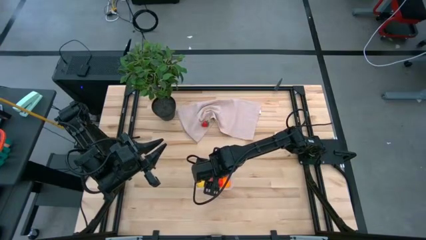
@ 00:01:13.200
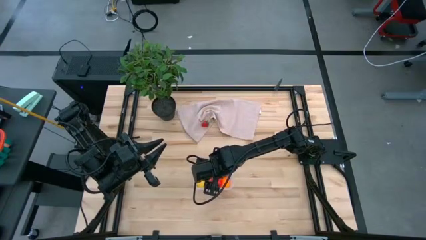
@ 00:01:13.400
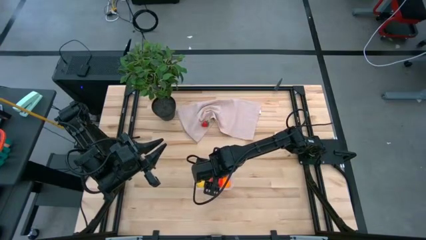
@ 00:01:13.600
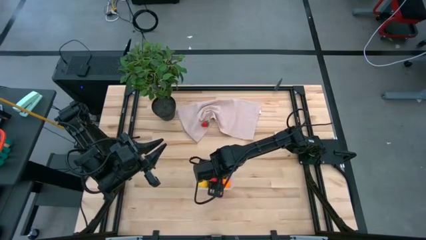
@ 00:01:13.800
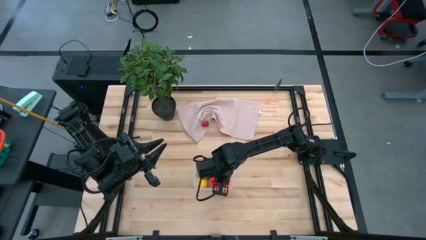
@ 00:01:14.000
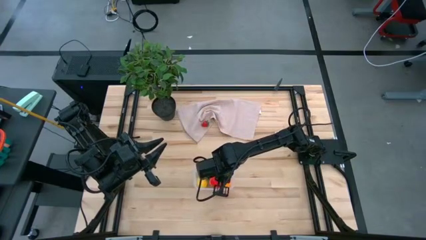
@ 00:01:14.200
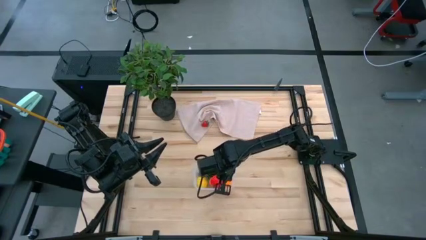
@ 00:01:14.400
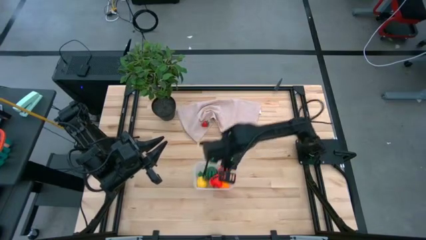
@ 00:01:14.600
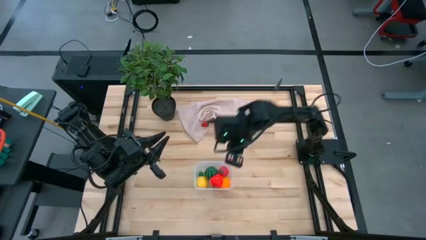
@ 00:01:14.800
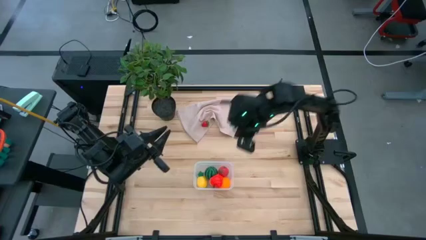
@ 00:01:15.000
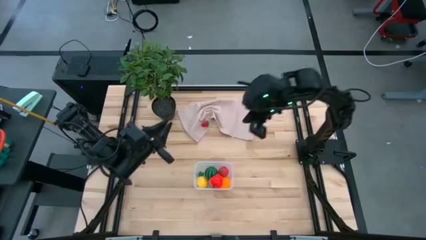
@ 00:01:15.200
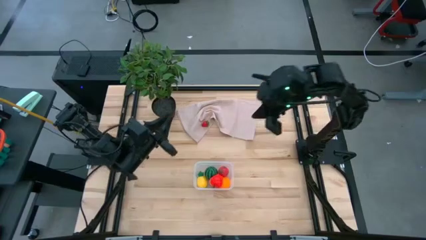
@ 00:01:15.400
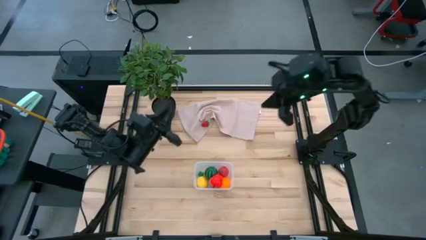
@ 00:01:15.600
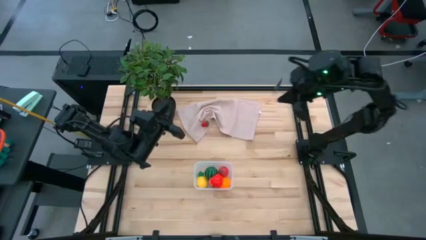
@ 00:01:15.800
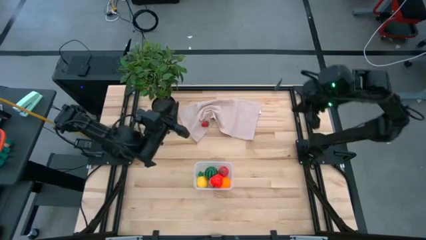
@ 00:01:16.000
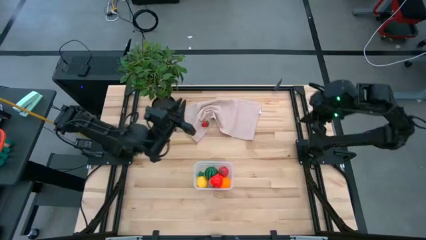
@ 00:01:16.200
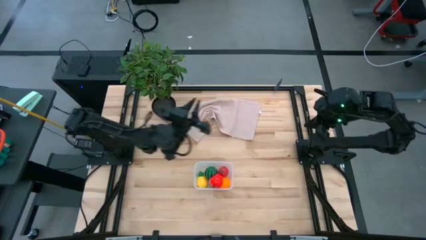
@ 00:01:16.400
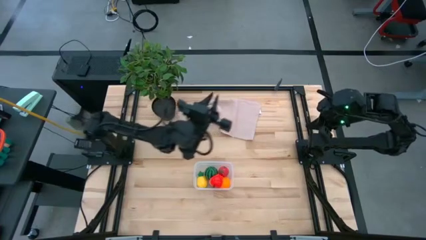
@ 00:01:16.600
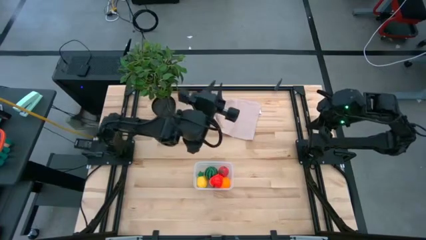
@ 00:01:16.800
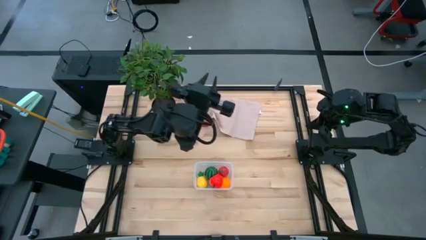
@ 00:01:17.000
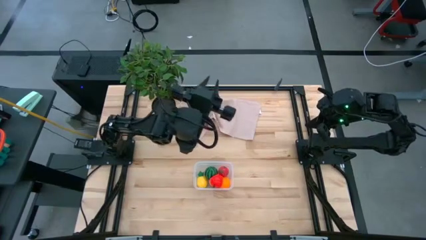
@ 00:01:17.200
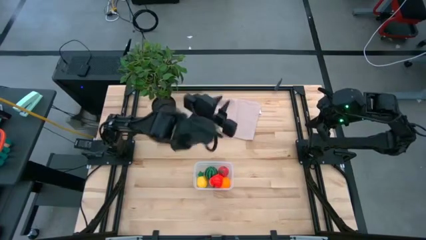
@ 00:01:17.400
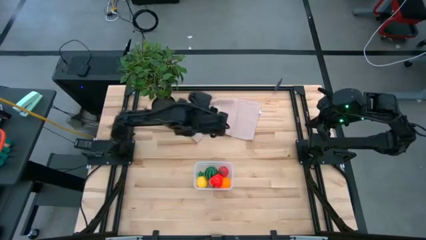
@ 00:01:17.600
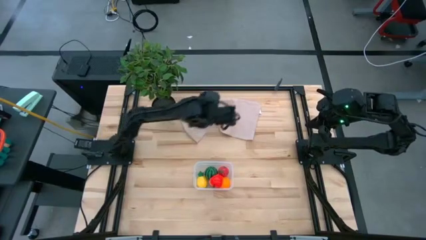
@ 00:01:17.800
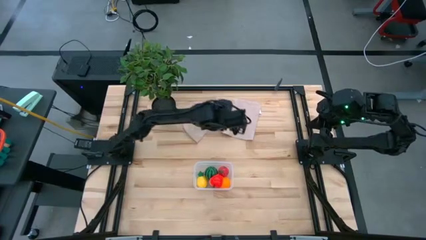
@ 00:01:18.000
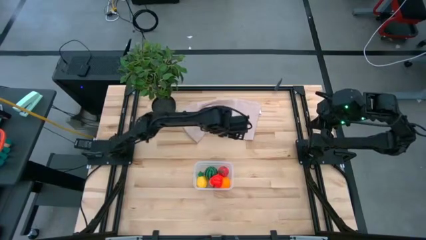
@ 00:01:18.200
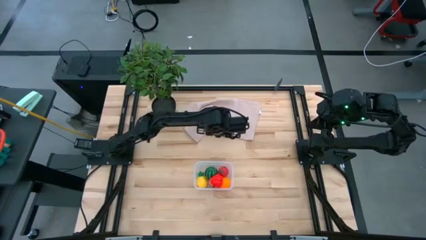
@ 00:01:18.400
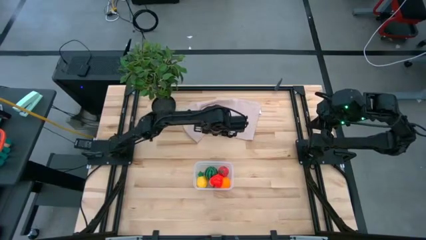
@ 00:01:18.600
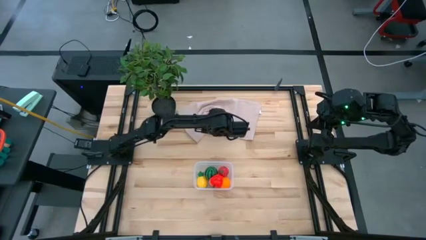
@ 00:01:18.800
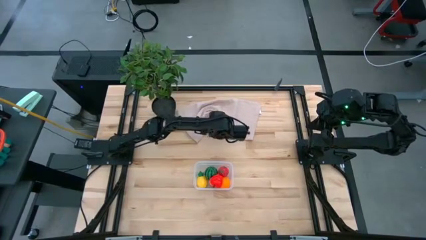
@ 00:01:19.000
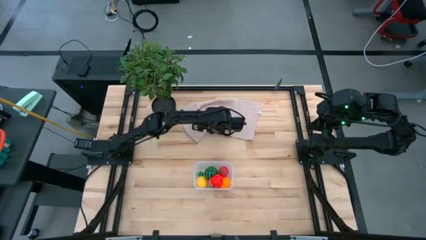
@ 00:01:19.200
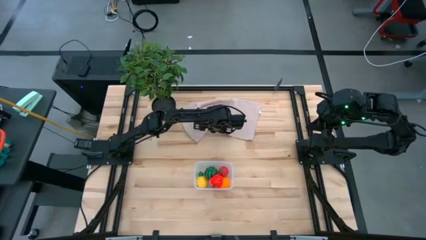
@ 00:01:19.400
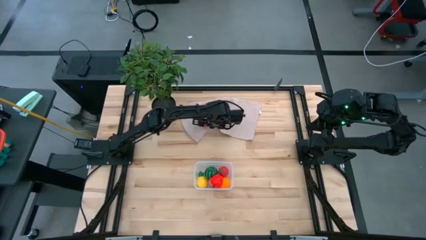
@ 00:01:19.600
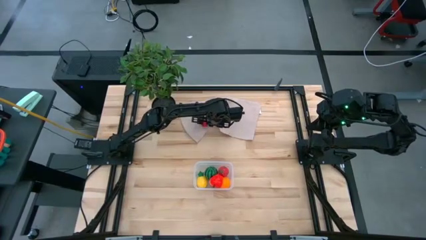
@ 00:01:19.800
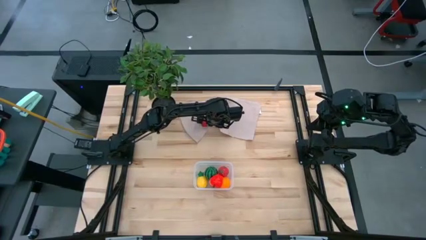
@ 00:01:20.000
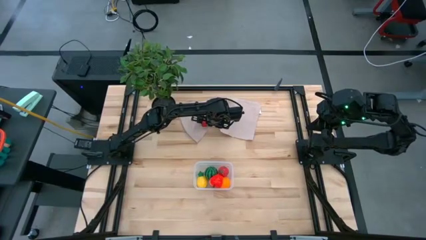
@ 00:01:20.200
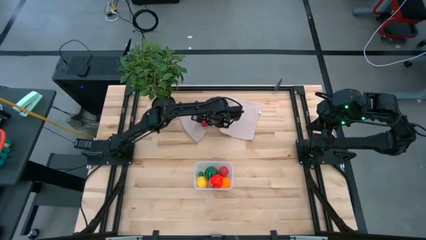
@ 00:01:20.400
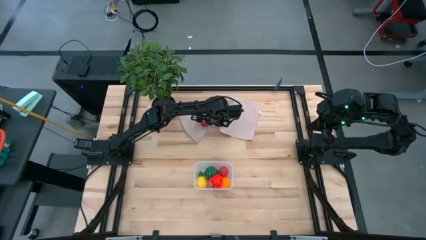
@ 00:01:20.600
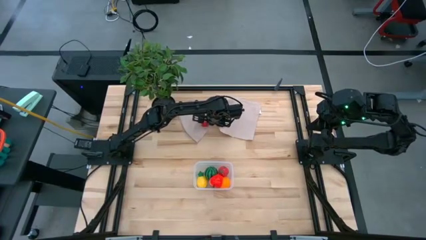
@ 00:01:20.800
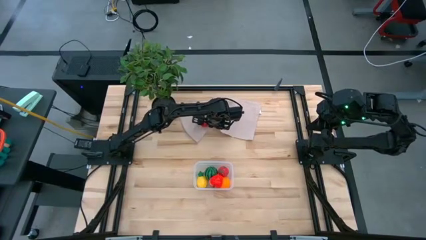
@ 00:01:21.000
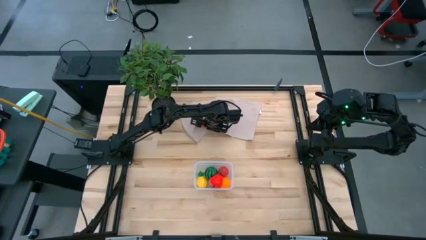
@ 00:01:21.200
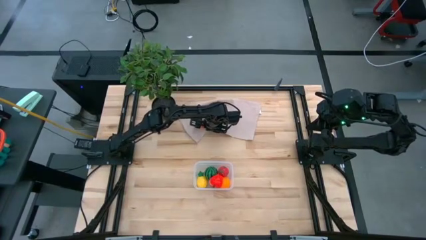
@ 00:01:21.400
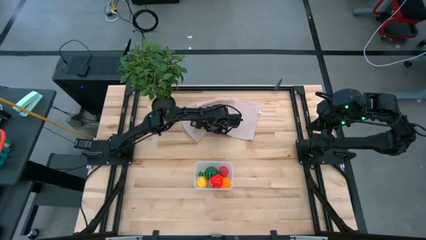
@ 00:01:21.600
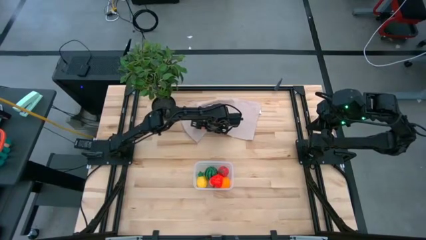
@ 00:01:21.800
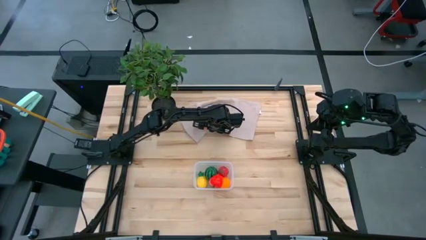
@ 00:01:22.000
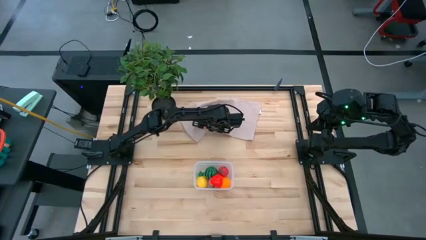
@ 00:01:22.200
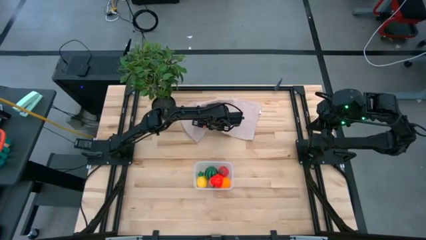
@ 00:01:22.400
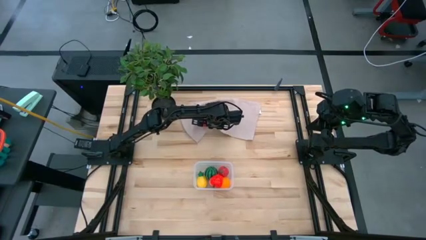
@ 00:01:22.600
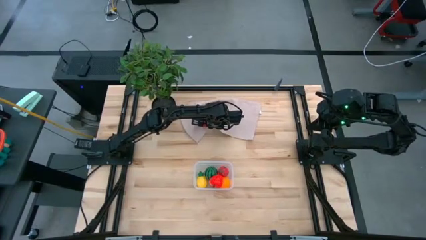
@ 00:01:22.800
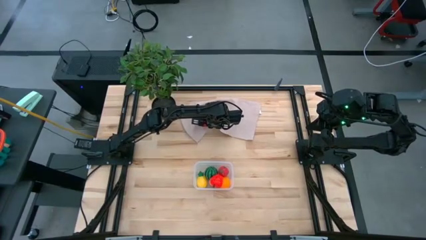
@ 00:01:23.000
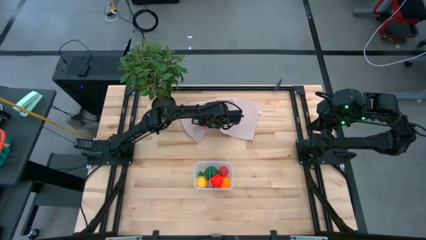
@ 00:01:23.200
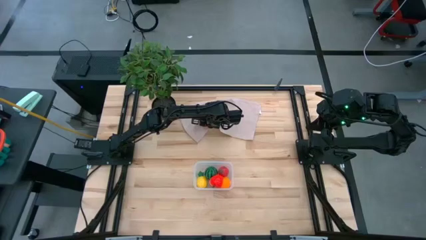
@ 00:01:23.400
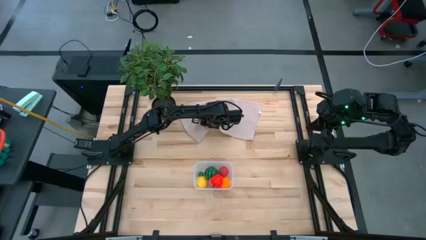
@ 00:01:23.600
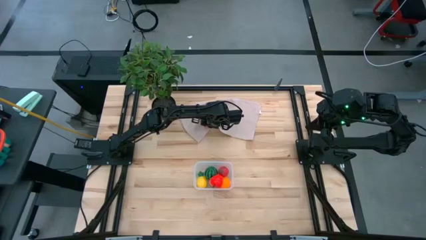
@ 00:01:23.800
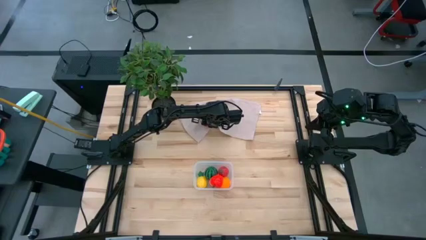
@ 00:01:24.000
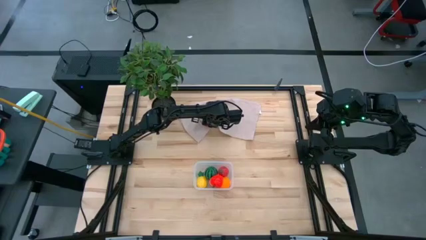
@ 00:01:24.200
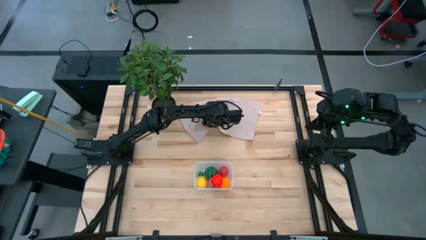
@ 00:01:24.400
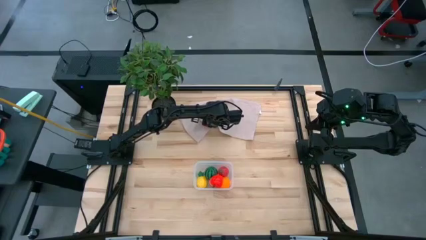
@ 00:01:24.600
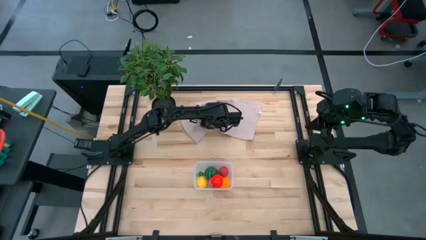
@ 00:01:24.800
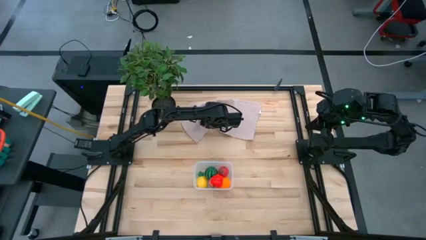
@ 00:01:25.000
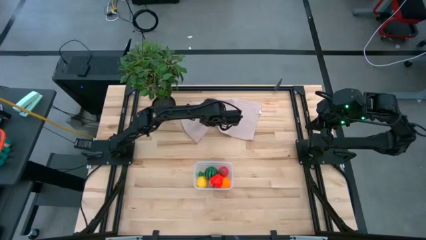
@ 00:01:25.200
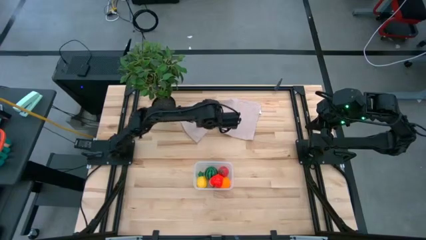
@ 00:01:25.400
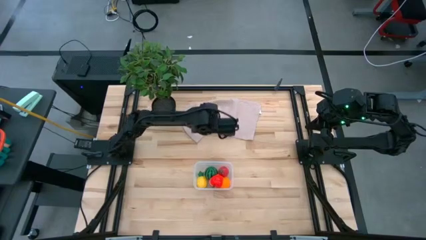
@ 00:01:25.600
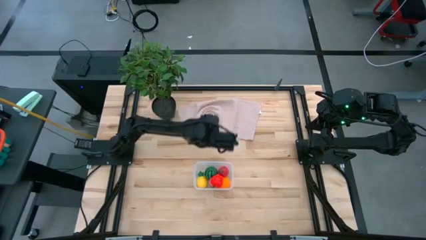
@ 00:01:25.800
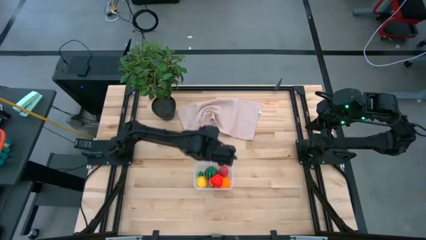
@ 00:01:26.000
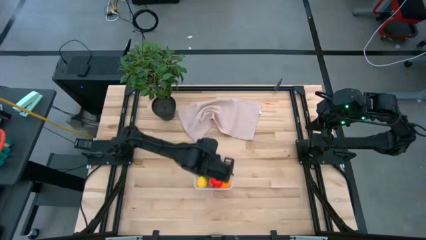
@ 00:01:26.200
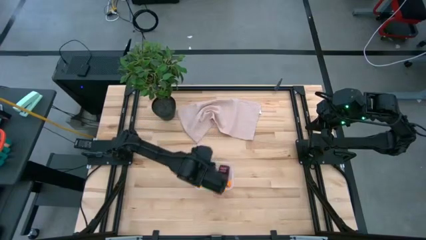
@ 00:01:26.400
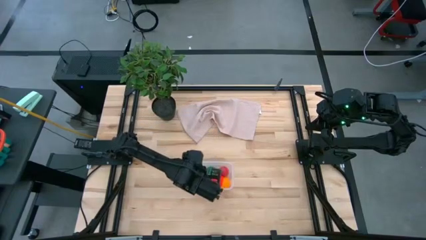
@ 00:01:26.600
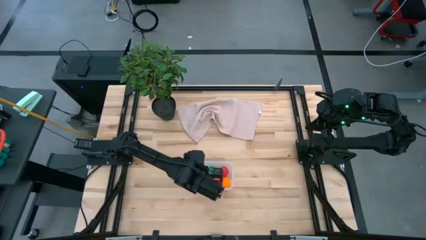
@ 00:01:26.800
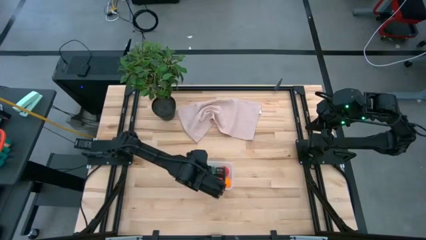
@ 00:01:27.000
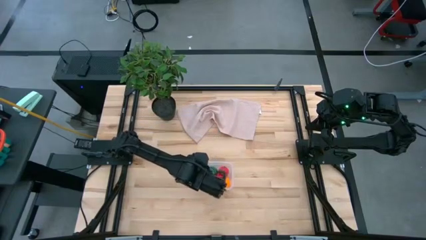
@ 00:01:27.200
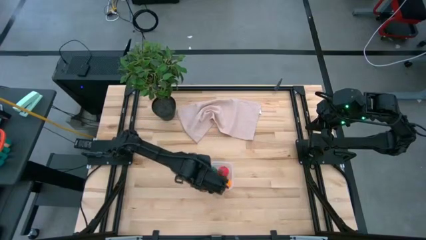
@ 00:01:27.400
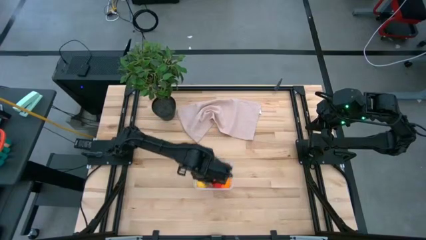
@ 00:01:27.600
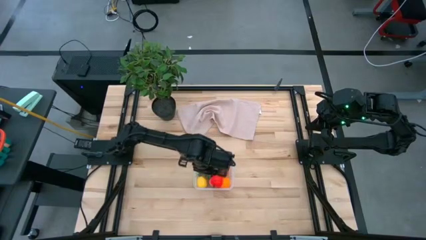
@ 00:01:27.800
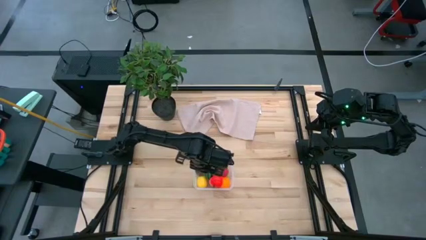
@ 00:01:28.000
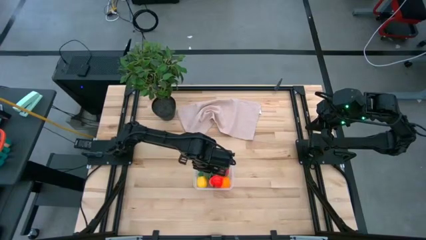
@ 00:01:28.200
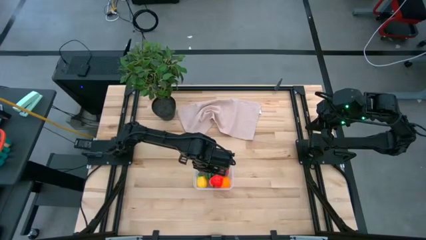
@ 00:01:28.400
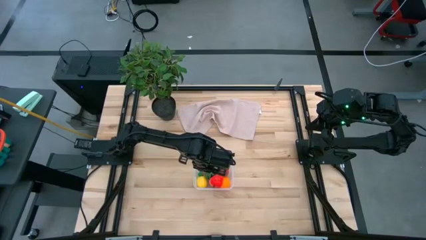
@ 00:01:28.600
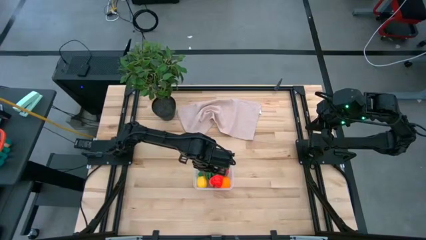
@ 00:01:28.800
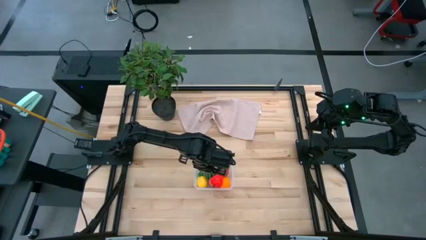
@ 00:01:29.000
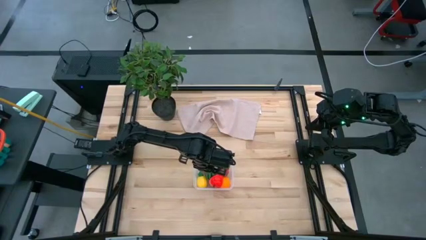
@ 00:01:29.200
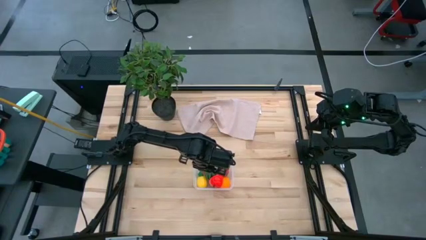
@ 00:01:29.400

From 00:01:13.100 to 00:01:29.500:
Task: Pick and placing Produce into tupperware
Put the strawberry into the transparent bin
